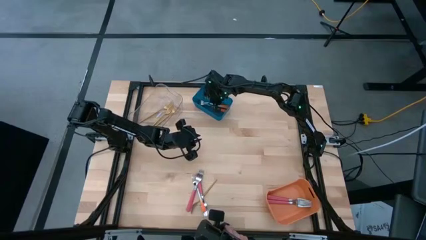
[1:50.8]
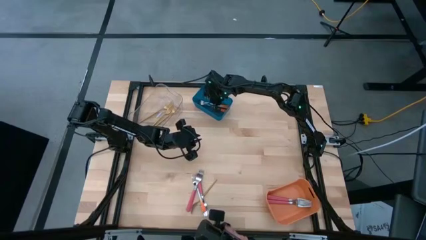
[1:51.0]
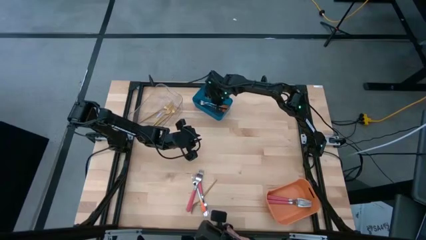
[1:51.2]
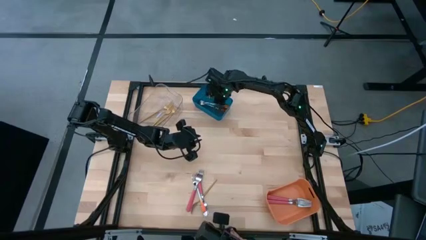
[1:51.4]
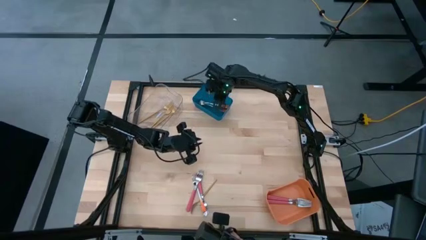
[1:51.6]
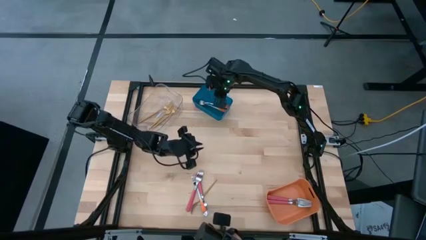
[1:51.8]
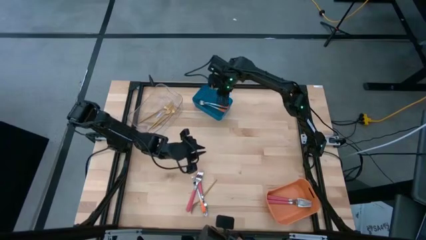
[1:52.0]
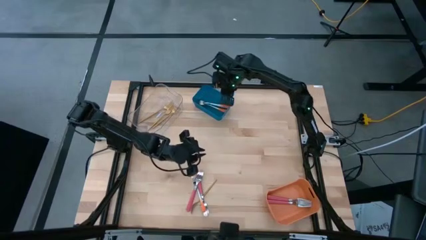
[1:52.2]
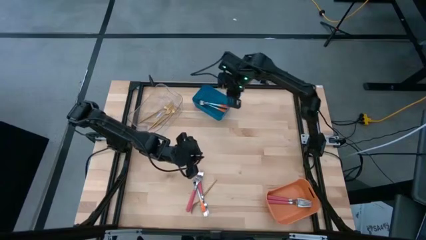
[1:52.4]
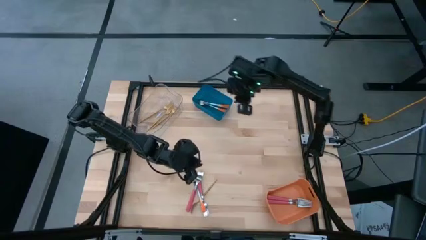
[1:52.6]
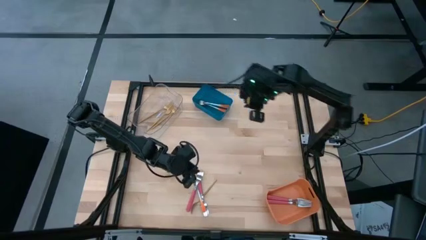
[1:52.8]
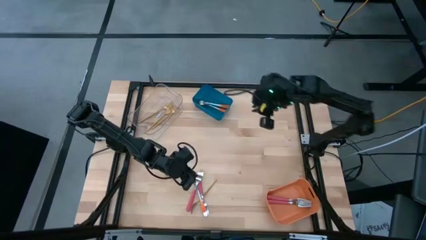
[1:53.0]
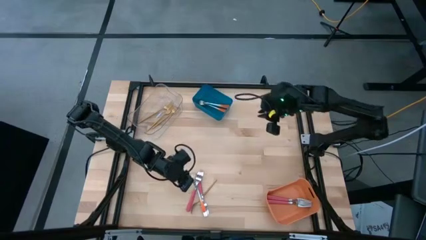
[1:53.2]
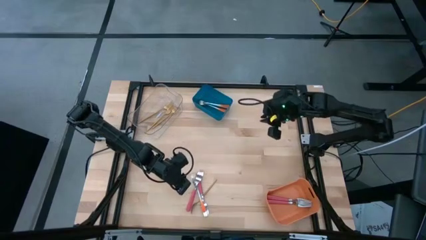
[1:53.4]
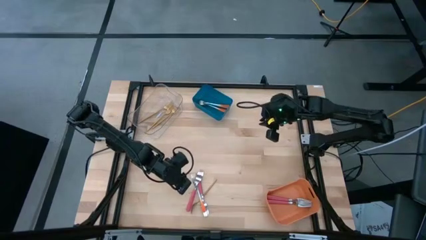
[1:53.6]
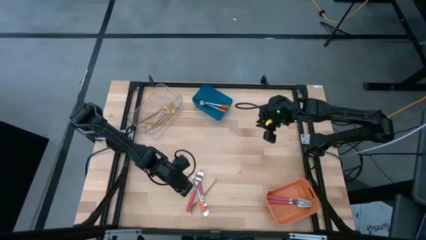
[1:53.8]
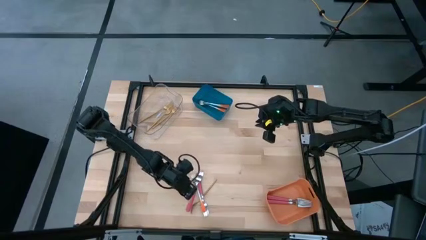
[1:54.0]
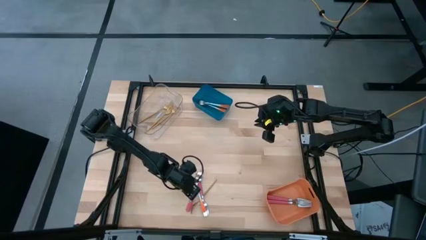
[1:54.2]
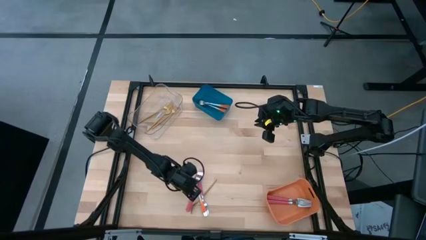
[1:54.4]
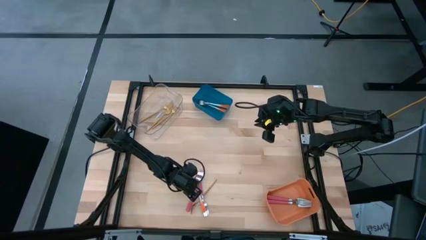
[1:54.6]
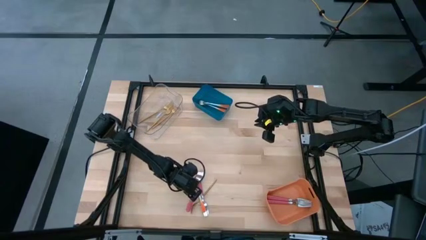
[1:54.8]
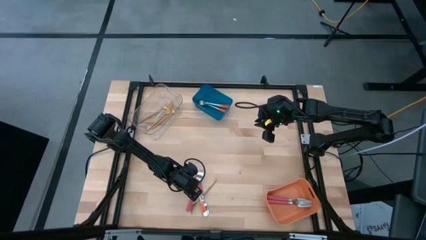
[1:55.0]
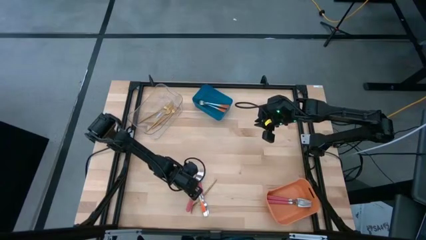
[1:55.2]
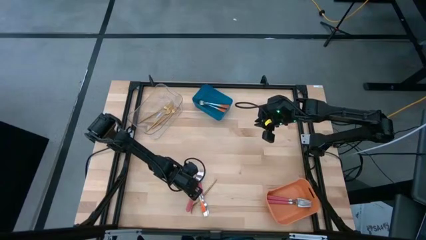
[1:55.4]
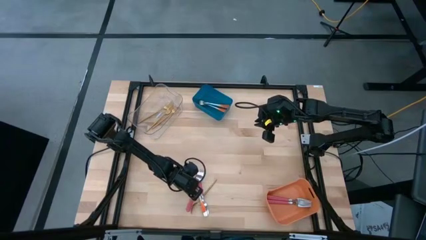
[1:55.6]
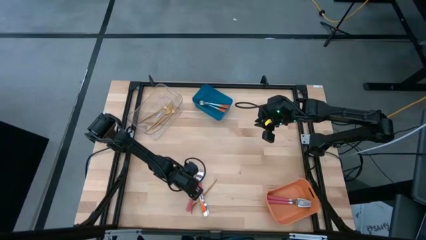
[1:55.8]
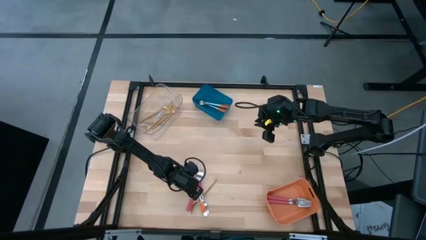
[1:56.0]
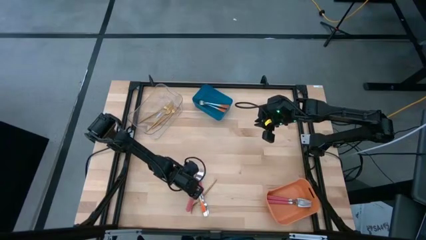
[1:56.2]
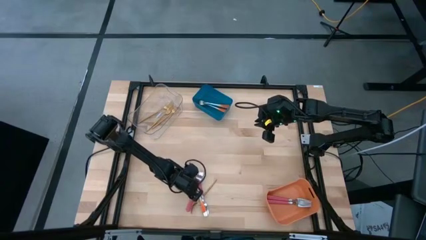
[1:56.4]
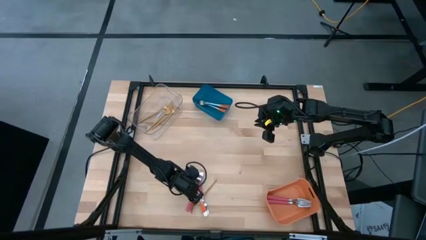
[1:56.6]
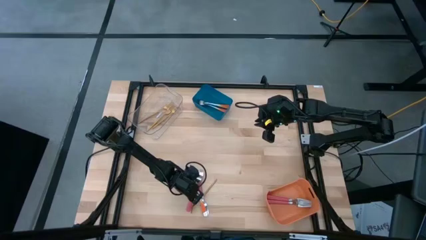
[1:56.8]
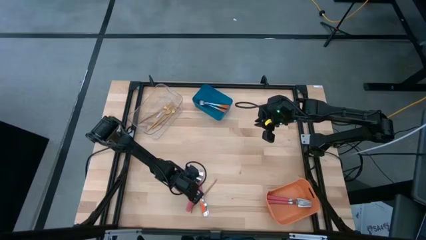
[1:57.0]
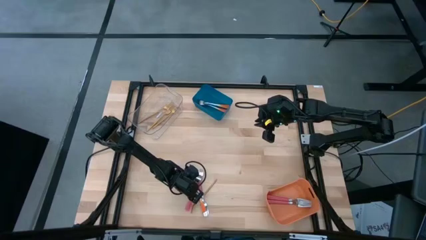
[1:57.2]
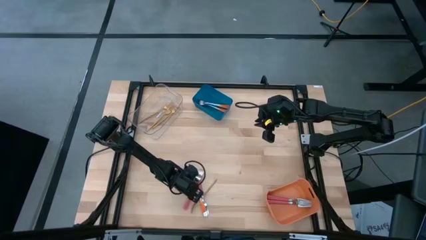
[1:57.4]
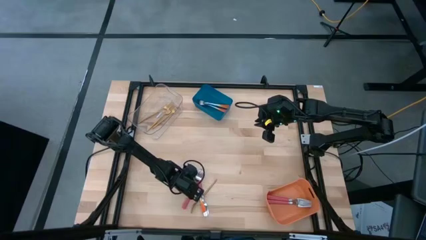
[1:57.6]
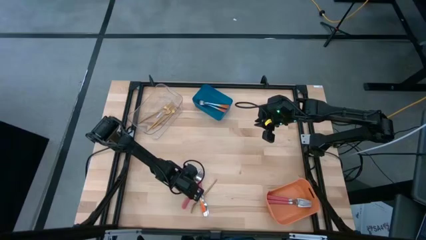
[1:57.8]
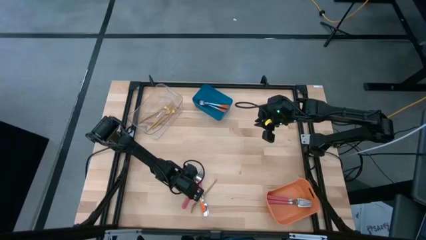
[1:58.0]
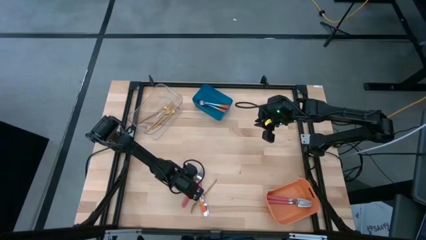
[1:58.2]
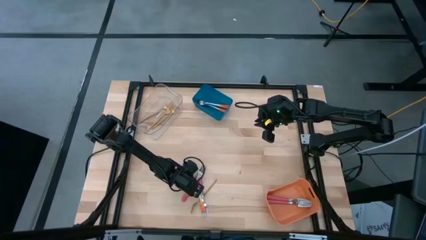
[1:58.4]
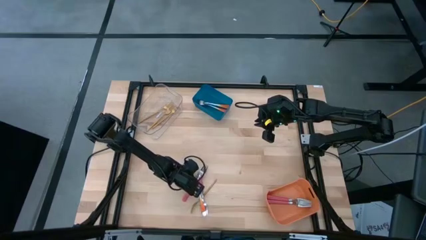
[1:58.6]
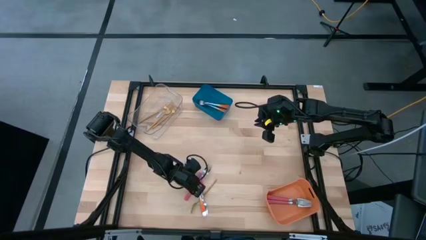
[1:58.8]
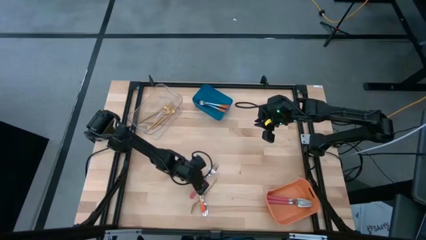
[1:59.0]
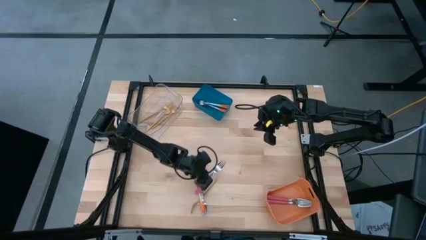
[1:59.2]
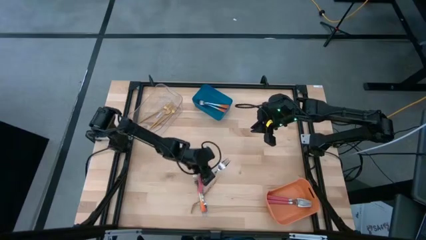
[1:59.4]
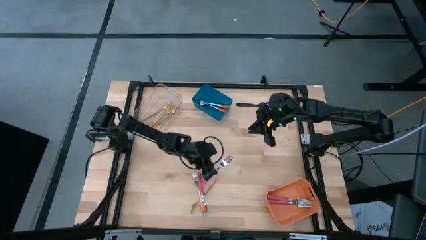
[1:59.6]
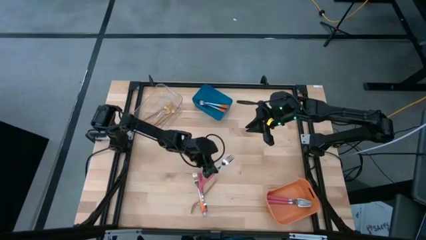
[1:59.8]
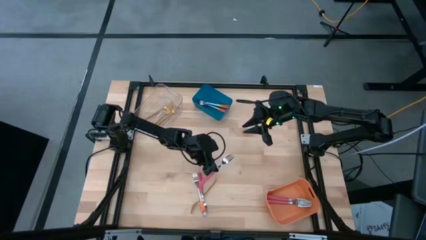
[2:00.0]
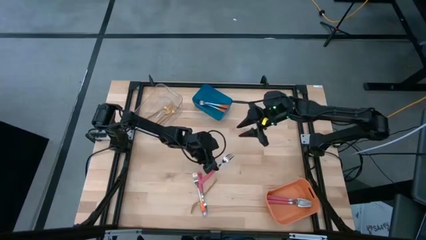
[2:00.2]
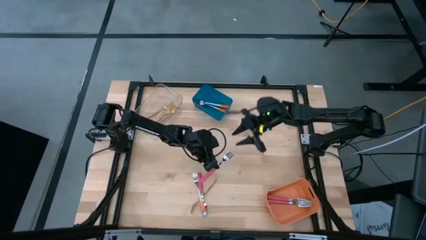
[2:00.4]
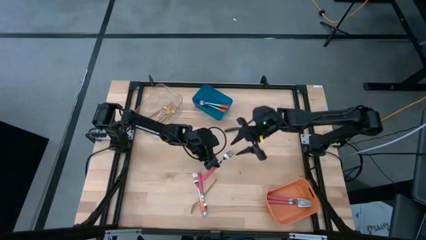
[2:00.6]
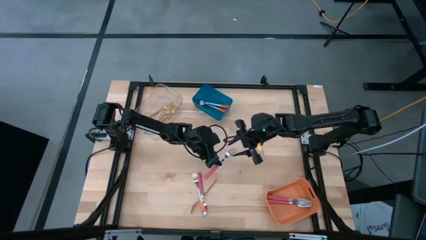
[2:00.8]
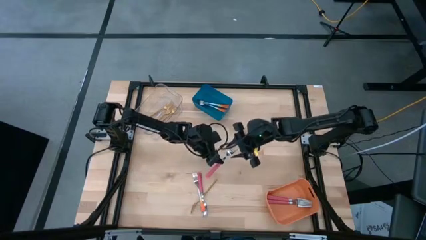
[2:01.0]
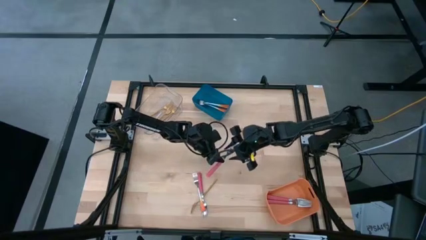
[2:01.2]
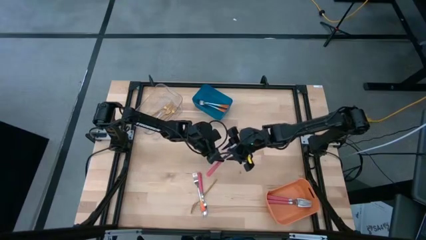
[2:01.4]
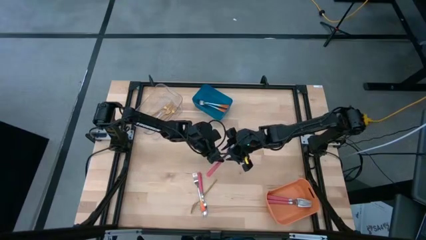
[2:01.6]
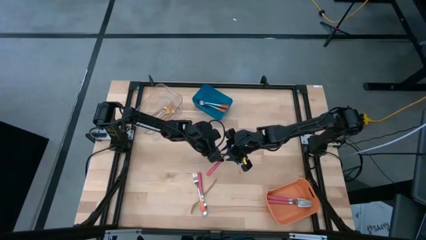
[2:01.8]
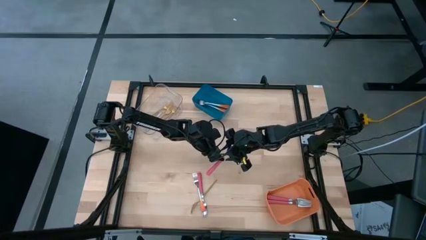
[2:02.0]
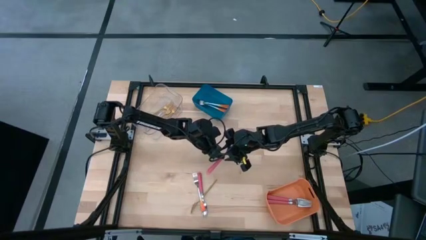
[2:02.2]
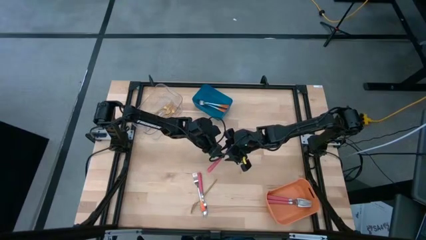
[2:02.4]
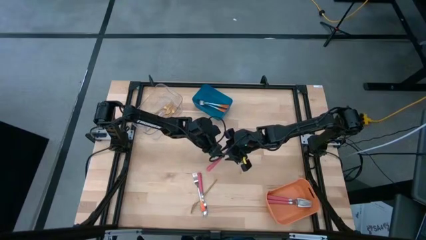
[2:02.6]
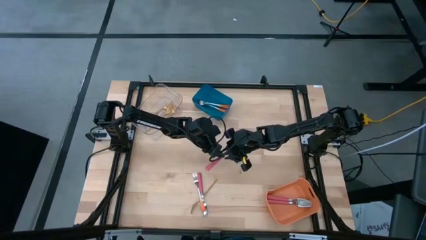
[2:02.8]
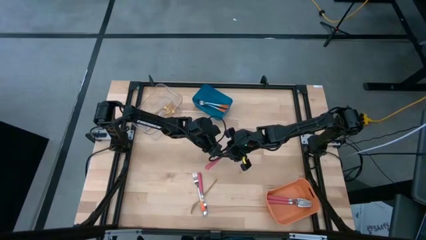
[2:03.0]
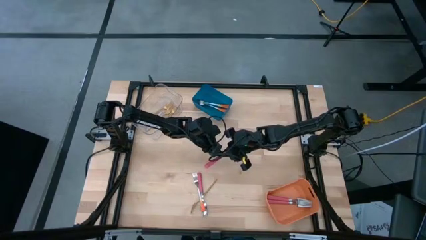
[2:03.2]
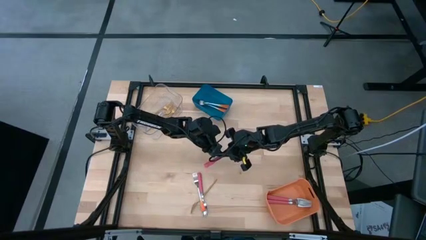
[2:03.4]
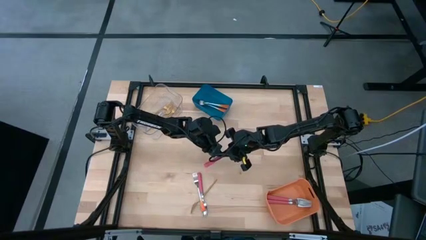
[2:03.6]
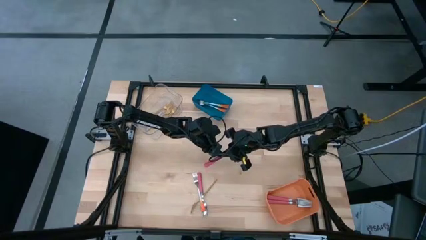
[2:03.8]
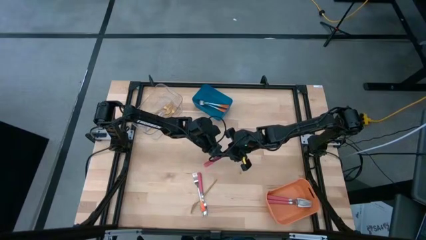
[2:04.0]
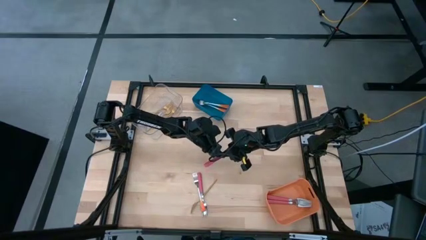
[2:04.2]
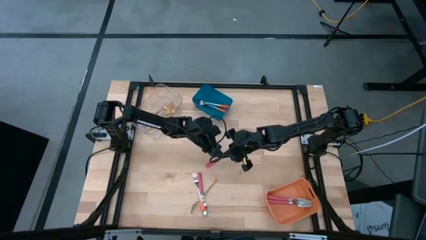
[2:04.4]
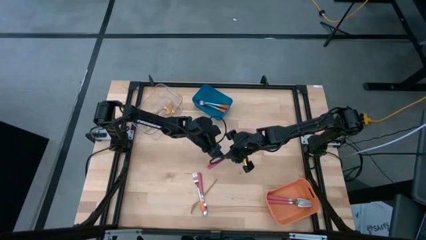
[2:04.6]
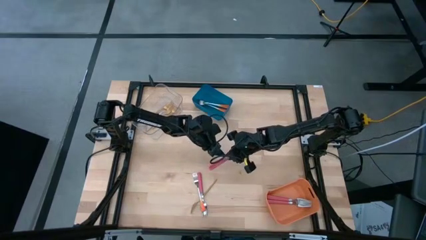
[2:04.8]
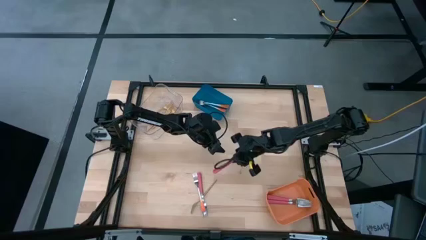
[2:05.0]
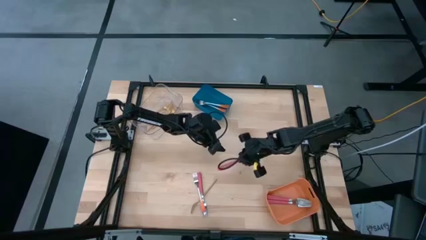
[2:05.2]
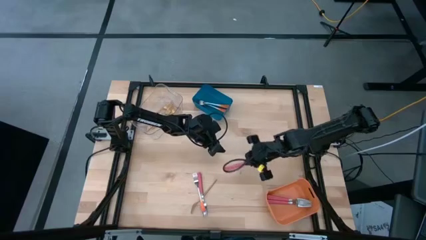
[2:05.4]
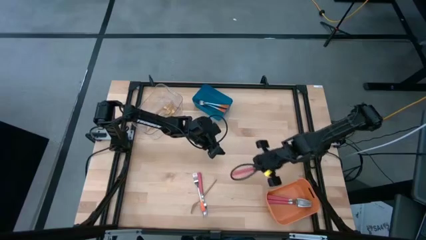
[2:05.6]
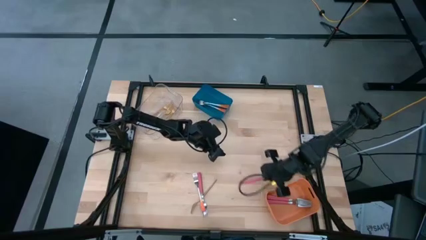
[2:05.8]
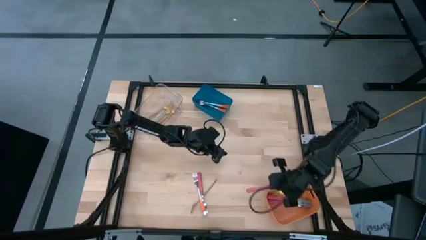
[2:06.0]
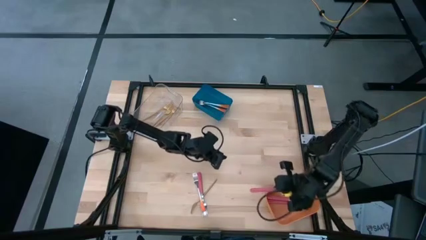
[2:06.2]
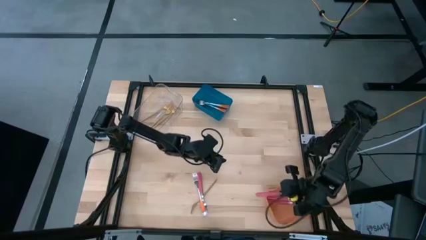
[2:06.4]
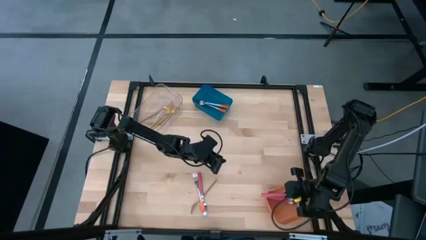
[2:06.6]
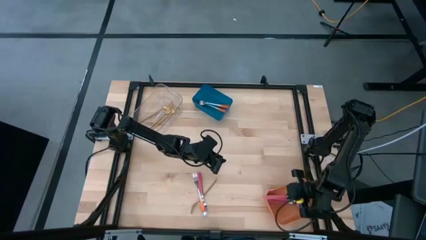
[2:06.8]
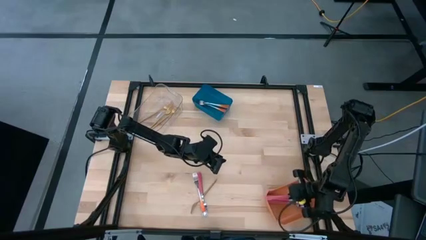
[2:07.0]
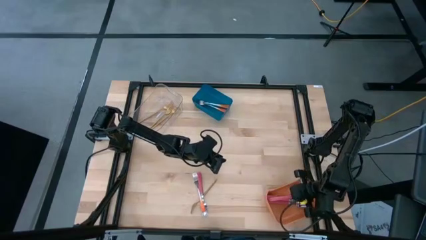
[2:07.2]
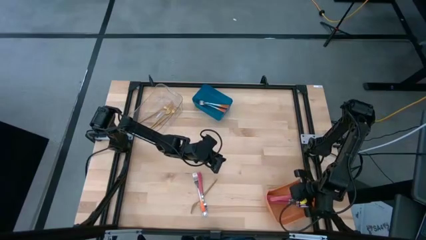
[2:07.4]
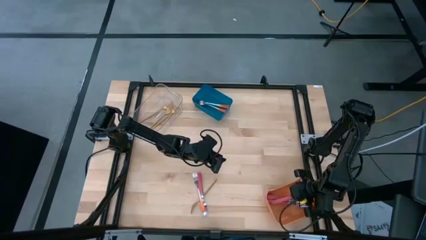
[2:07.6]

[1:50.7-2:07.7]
Task: Sort silverware by color (type)
Put the pink fork into the orange bin
